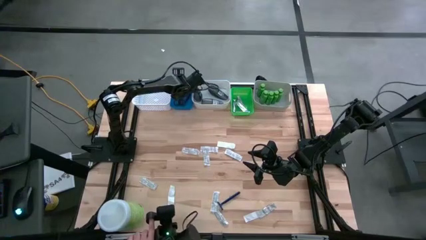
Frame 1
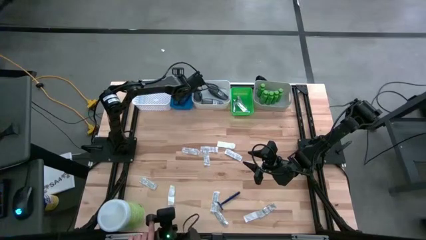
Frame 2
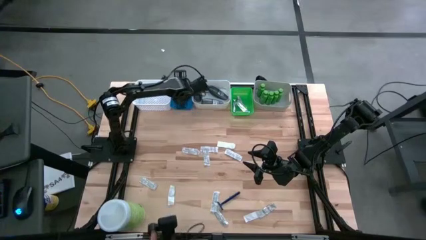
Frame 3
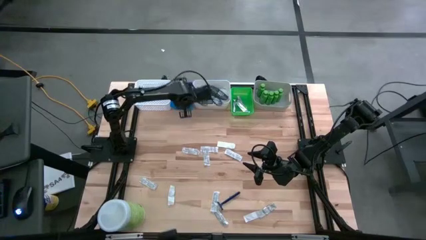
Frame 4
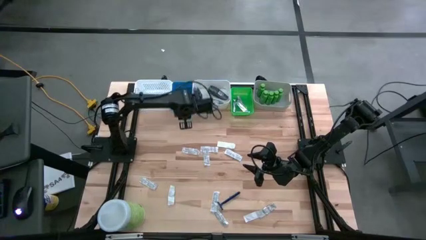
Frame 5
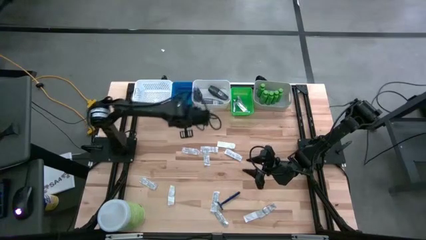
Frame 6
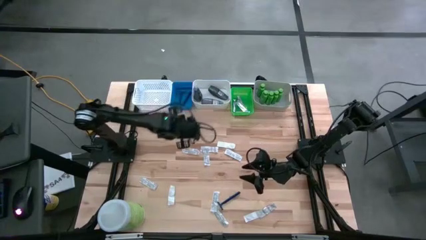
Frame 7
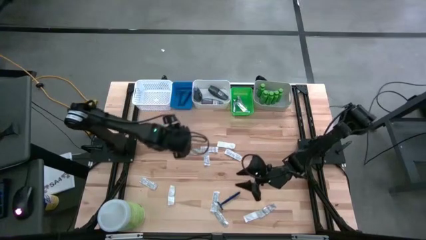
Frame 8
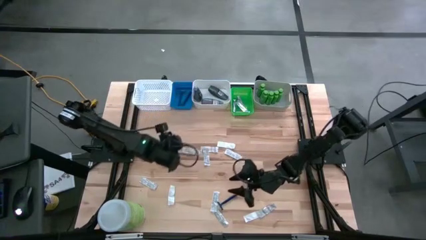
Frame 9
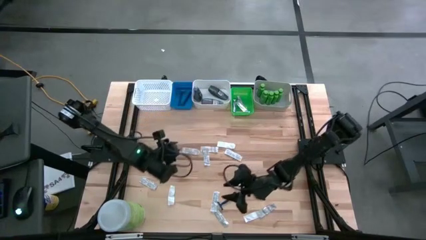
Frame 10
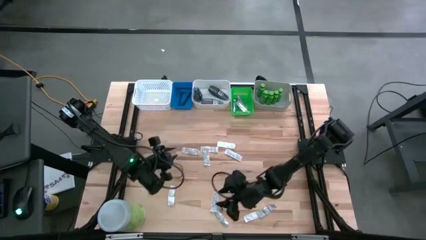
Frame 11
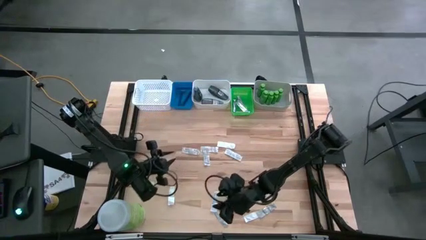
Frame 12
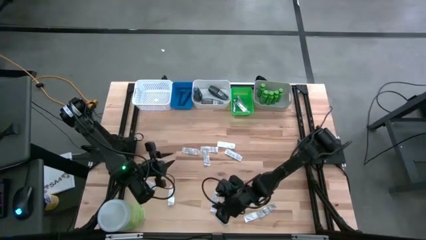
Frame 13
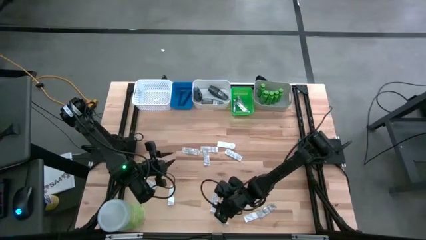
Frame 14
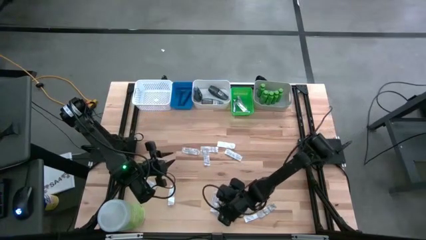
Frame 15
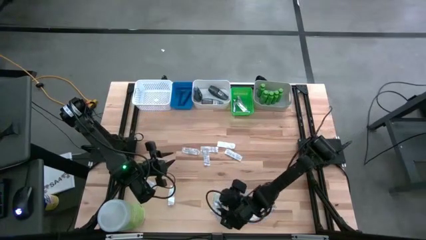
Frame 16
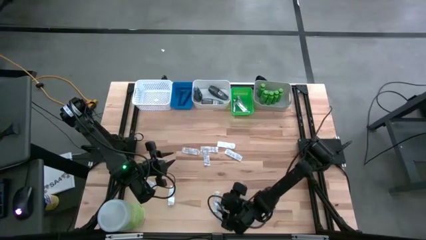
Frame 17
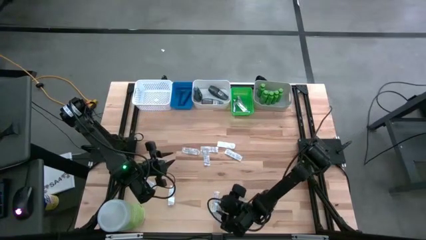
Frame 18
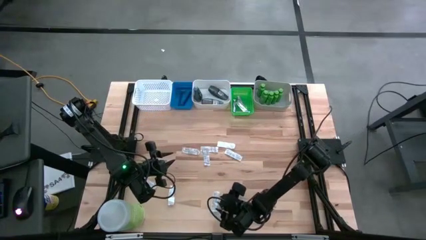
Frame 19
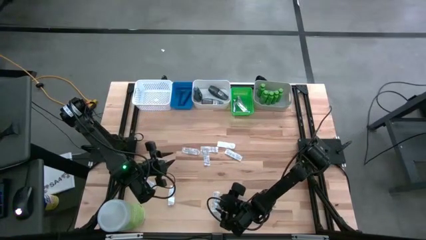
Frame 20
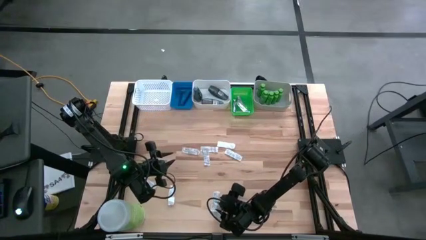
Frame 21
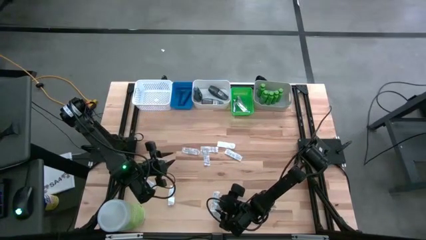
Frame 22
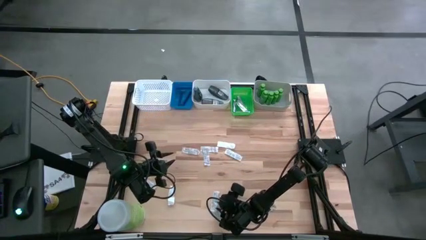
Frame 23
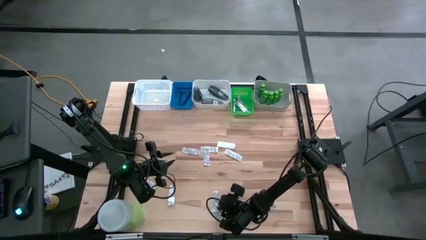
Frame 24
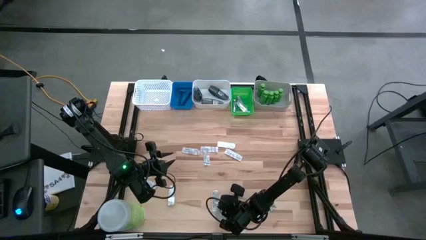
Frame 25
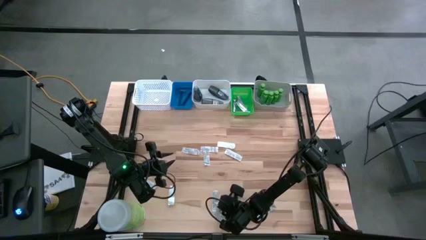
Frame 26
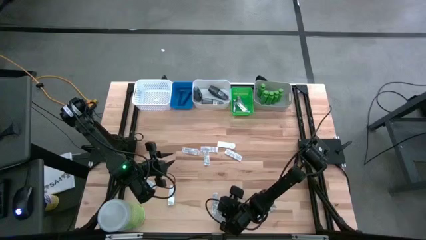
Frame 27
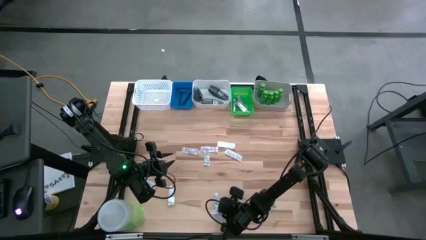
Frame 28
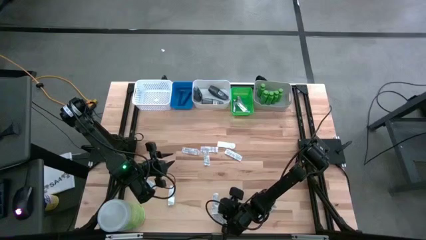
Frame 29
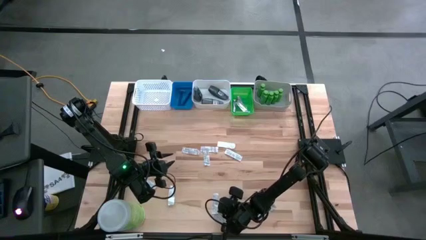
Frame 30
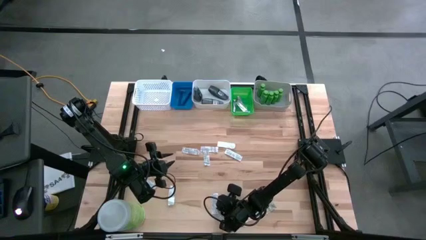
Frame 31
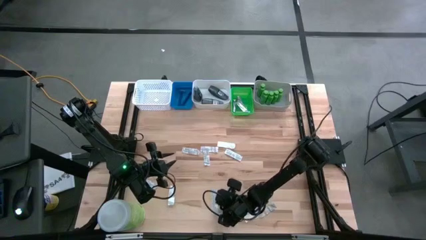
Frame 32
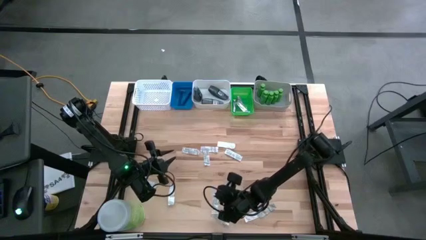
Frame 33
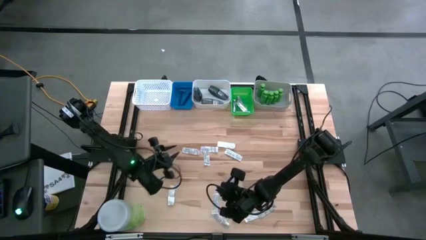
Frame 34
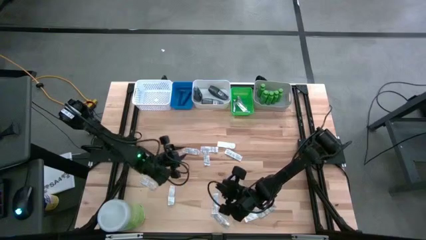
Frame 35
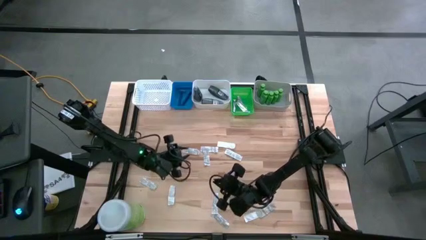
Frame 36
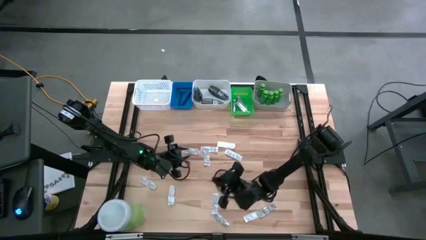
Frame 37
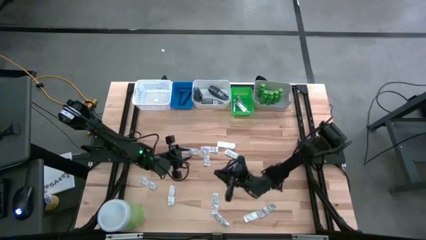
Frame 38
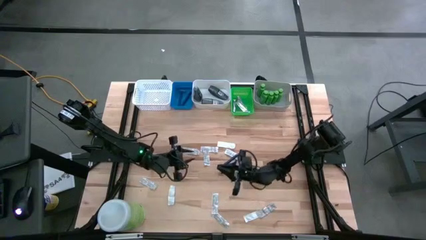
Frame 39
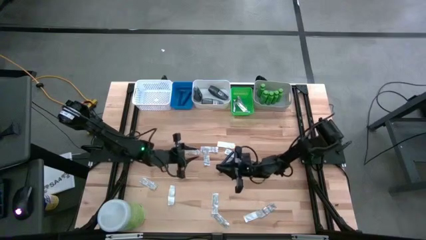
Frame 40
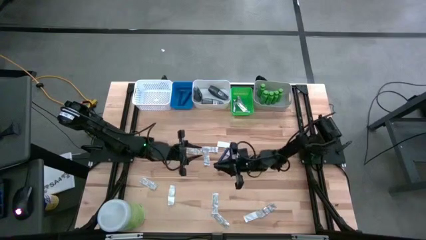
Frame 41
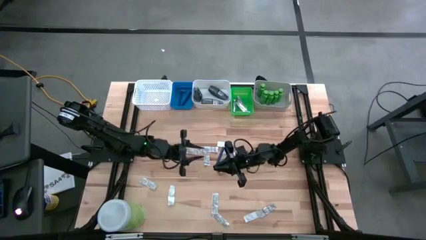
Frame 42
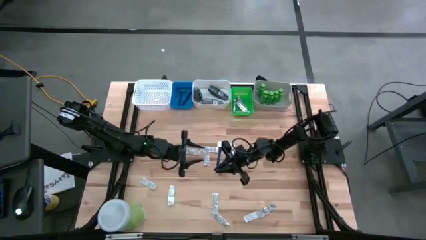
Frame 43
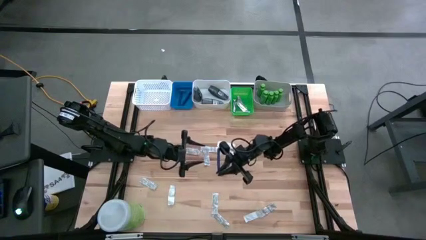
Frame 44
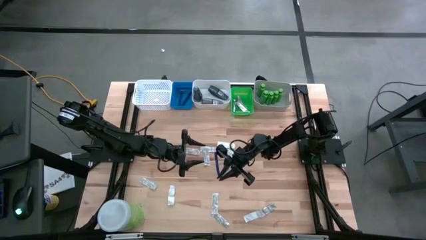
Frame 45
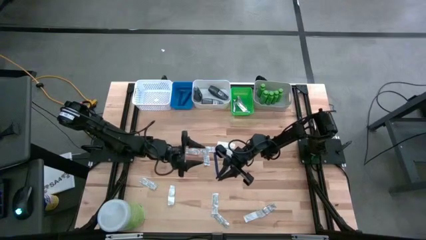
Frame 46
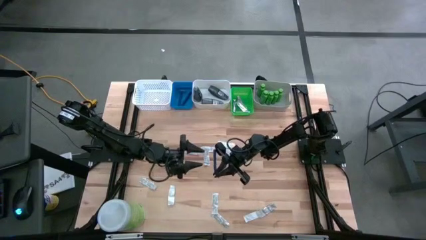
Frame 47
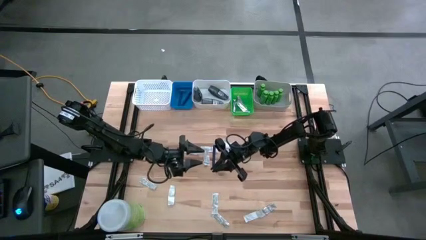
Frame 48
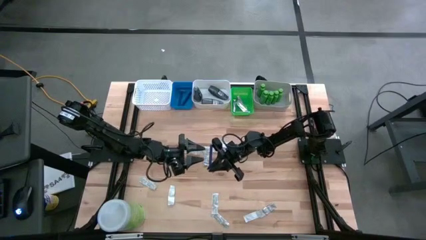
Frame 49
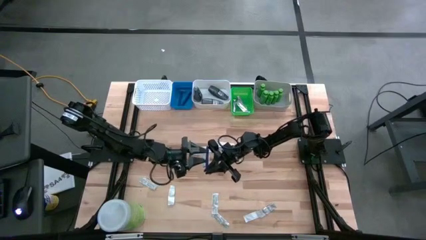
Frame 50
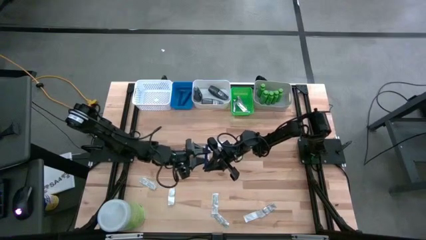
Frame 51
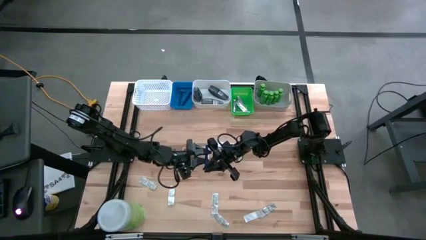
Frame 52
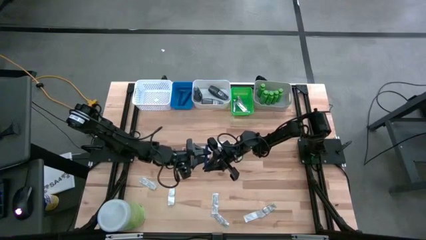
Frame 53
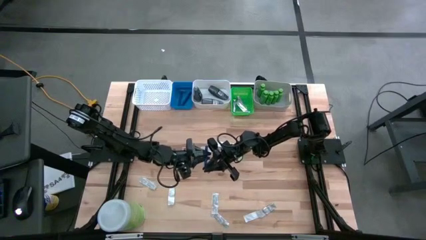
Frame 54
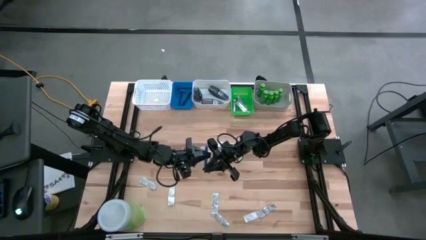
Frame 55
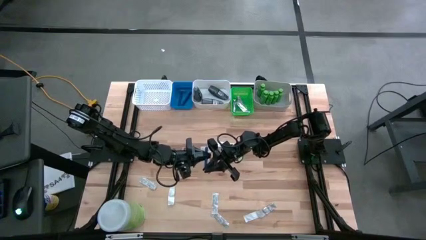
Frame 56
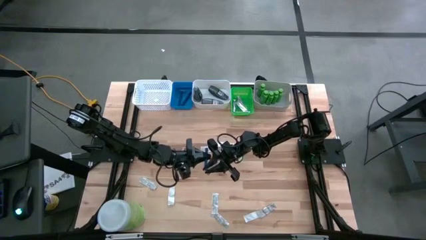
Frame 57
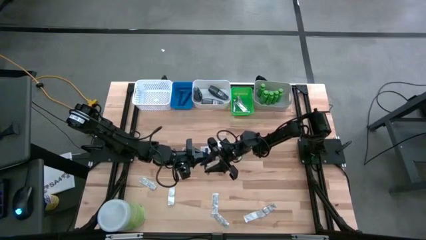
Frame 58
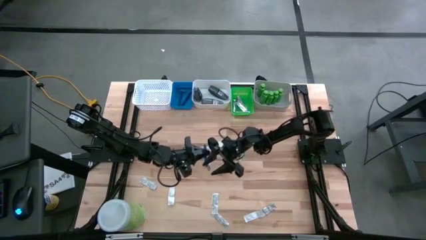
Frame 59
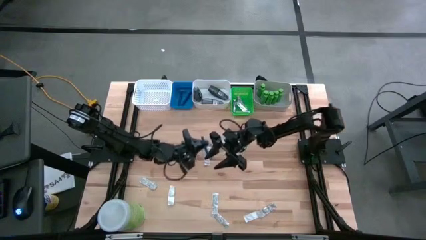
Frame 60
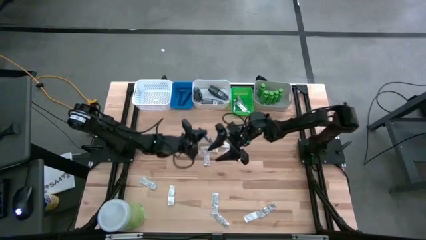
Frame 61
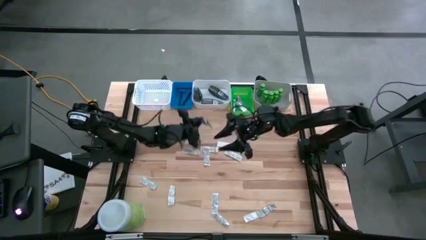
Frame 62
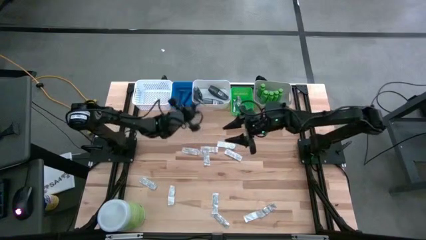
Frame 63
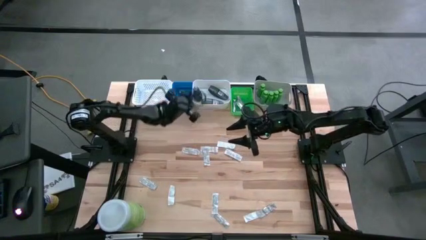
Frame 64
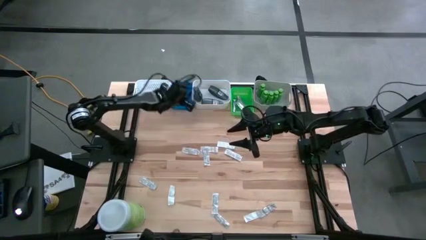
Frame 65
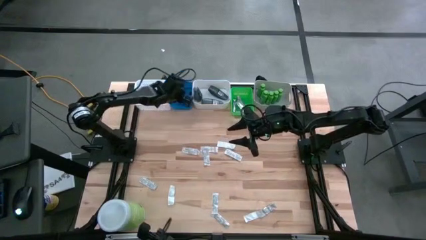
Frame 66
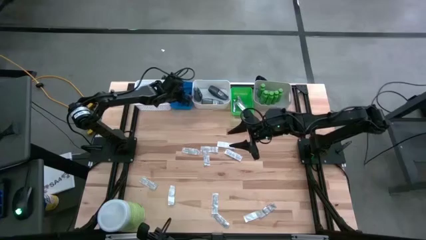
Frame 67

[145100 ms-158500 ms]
Task: Pick & Place Travel size toiletries
Put the razor into the blue bin

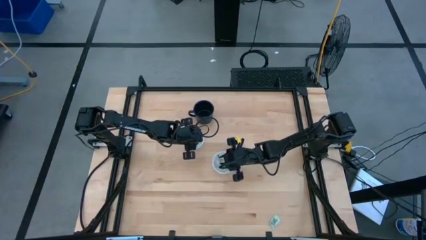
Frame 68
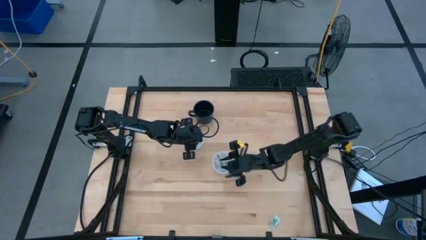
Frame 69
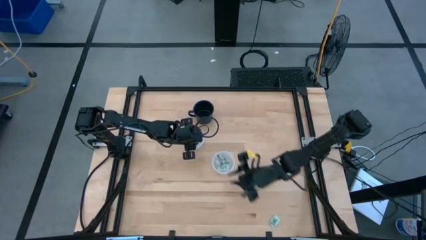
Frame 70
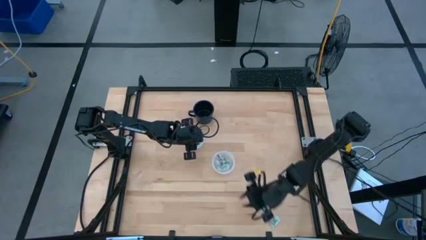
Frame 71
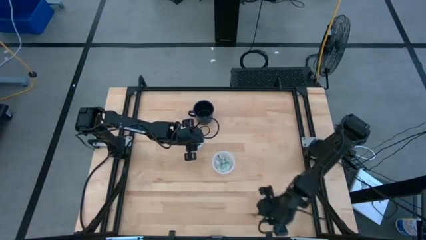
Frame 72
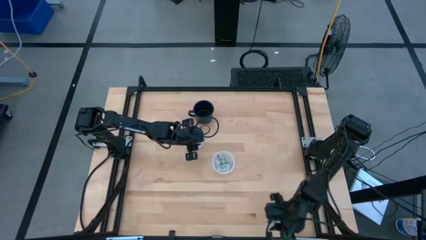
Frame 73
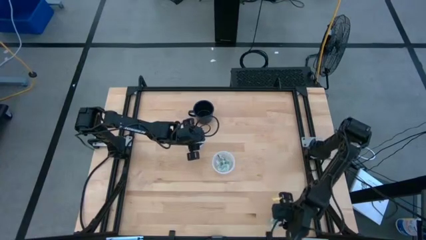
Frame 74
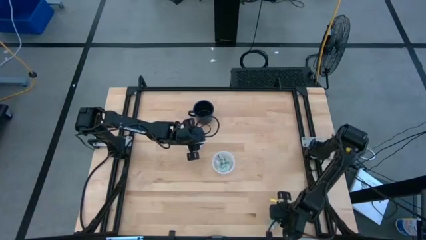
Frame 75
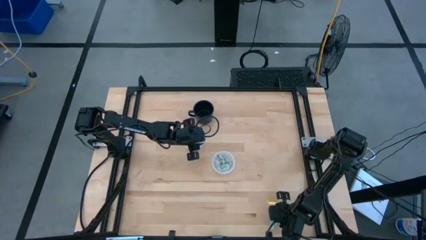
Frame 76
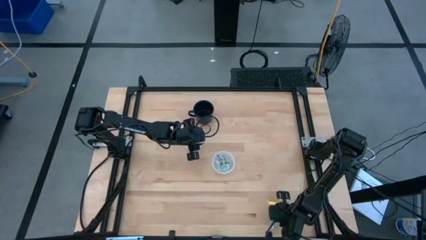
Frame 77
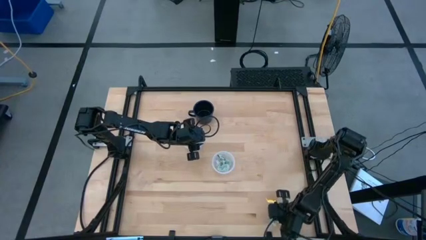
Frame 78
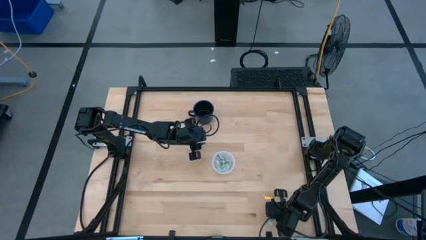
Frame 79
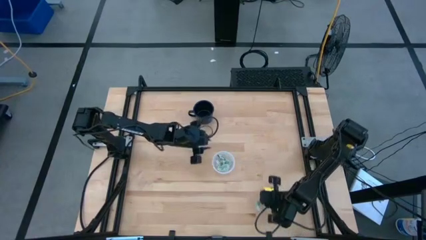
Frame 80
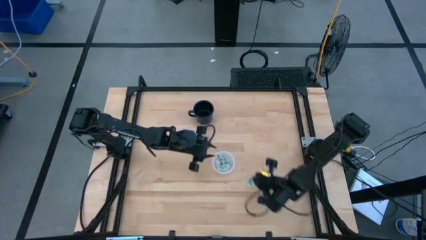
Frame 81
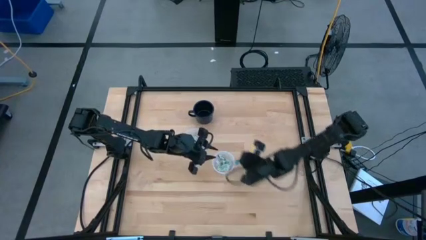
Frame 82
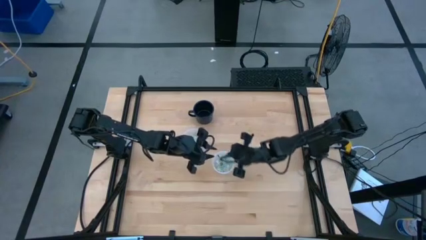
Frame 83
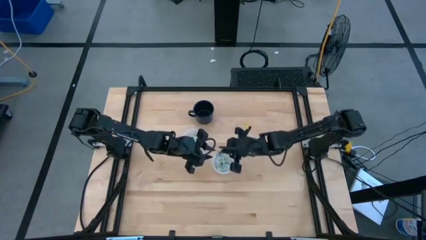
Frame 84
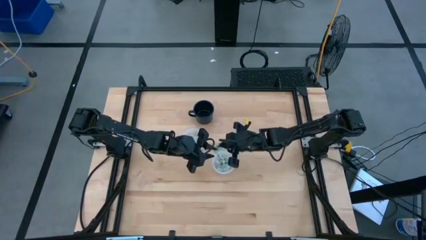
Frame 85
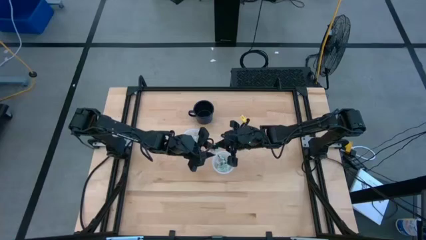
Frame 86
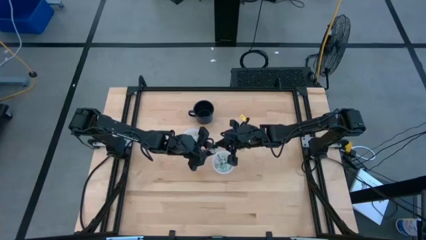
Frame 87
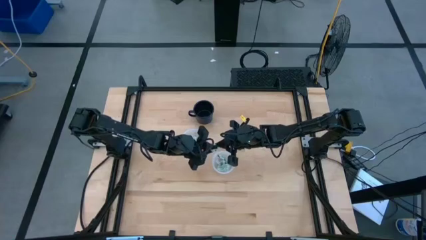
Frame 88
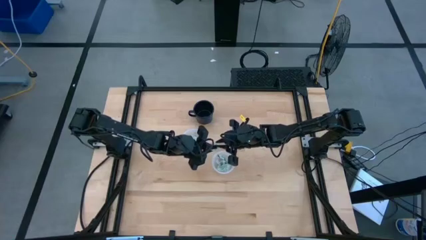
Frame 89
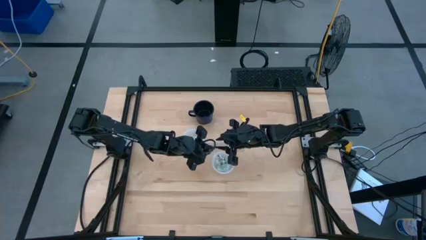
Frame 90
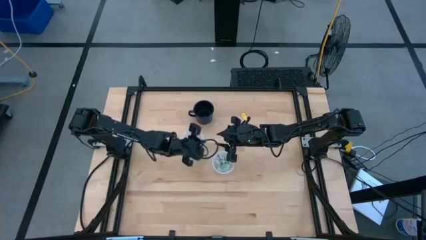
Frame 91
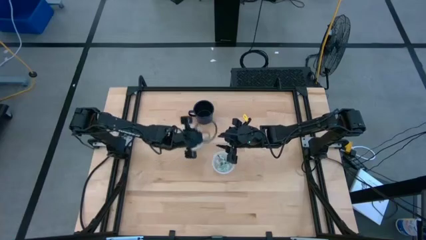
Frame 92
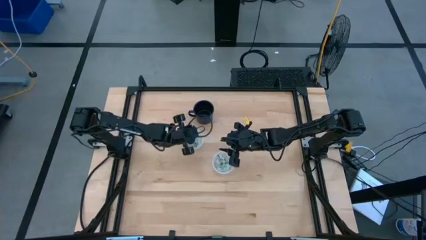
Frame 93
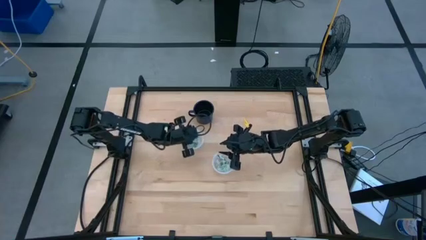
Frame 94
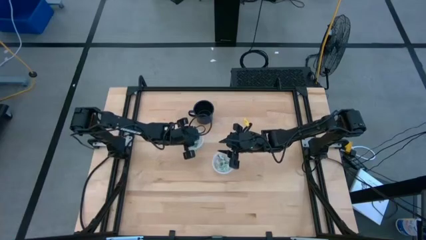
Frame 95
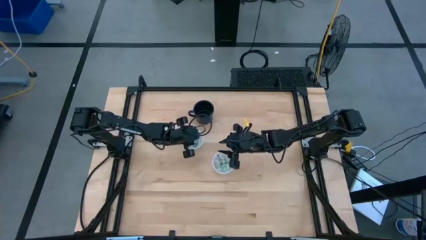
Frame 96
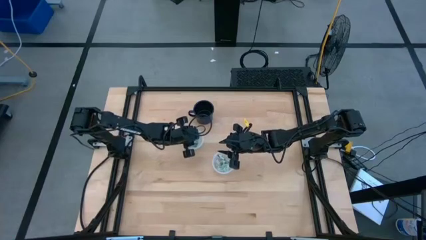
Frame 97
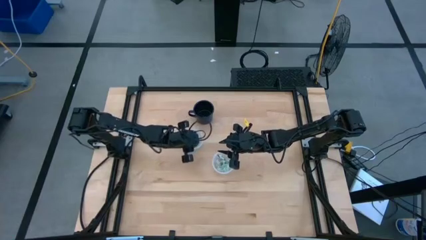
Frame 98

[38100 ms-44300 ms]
Task: Pick and place Stevia / Truvia into bins
Put the stevia packet into the top round transparent container
